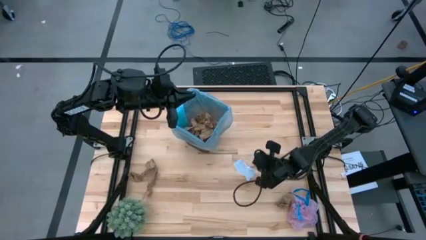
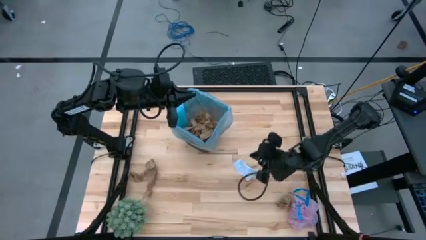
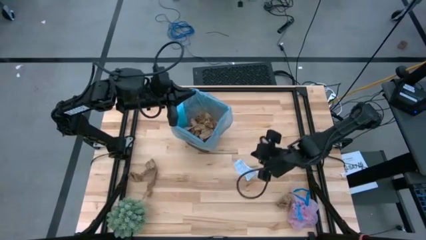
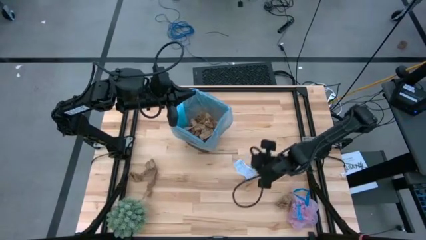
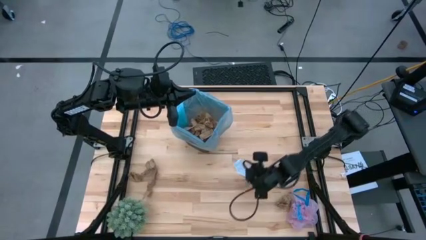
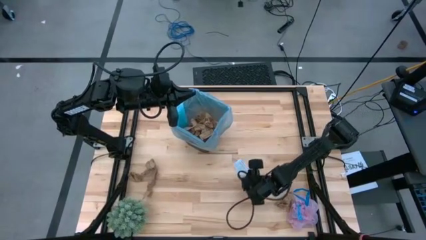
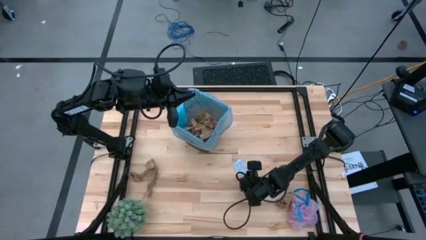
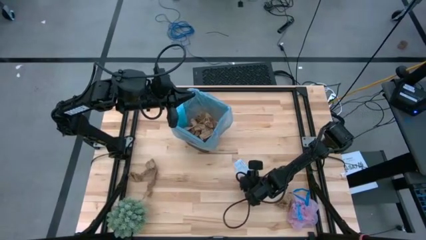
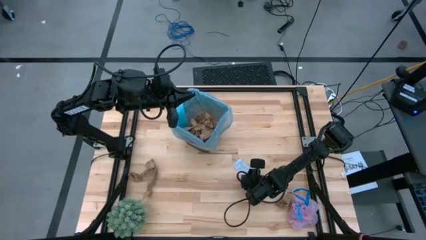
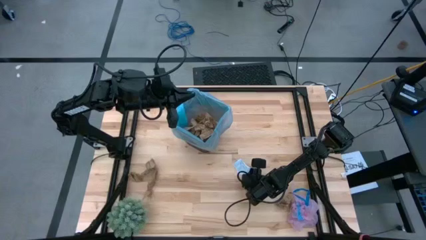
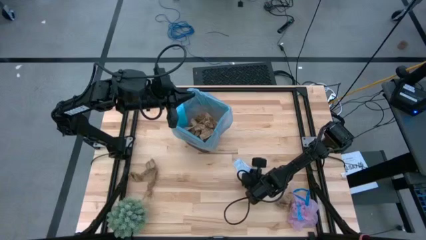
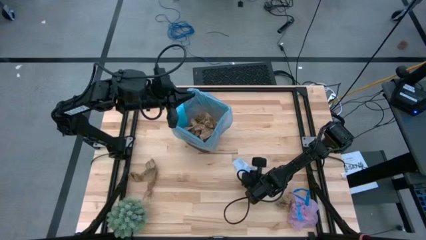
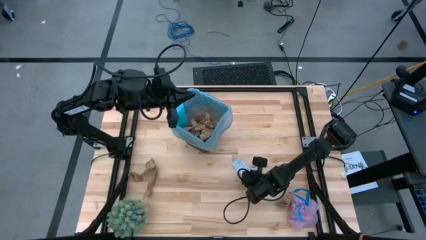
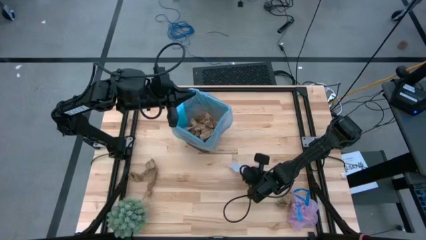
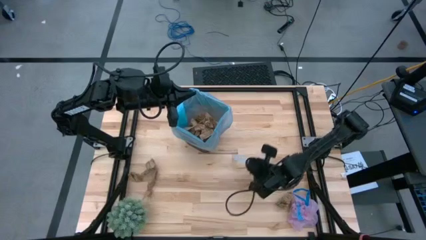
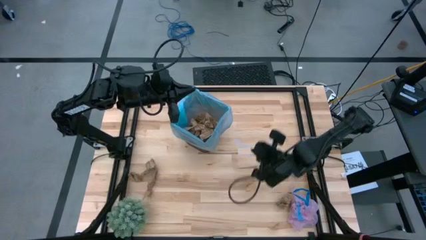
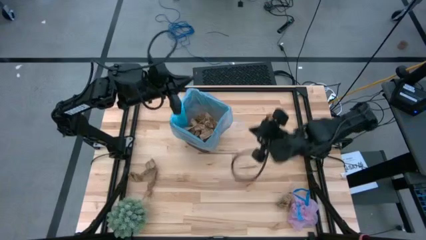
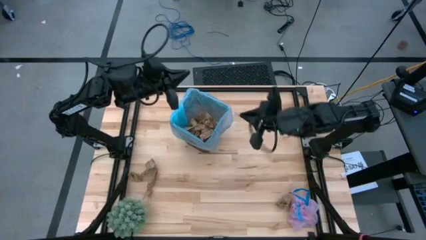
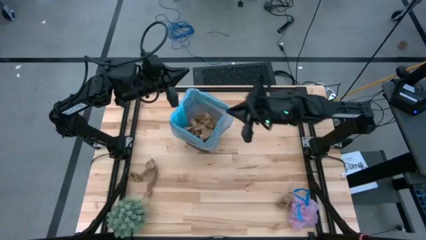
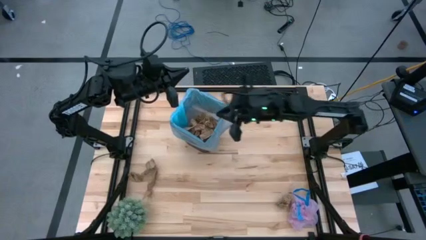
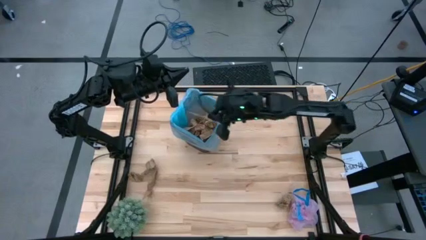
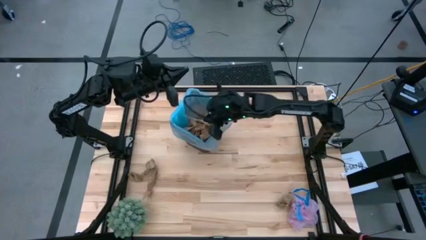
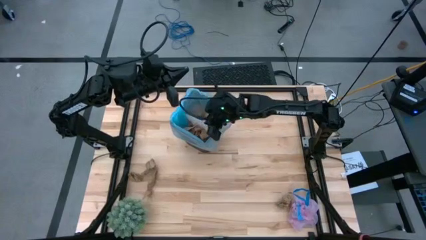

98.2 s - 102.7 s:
Task: Pick and place trash into bin
Put the gray paper into the brown trash bin

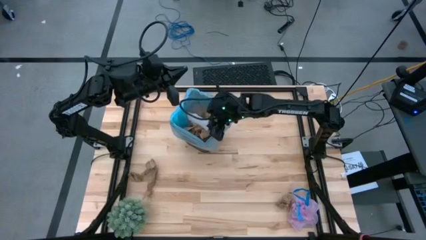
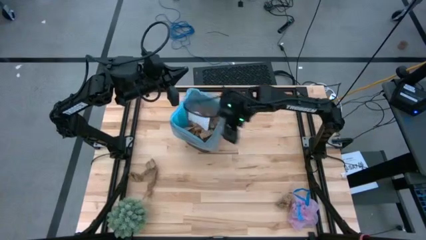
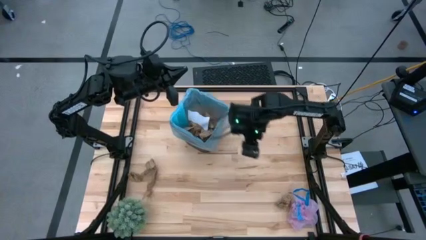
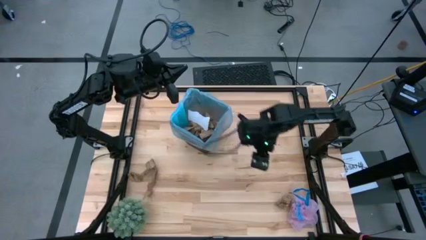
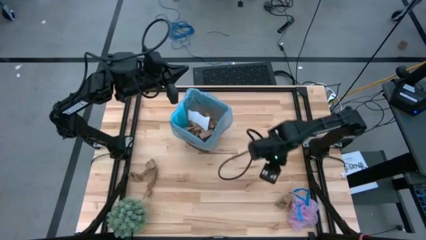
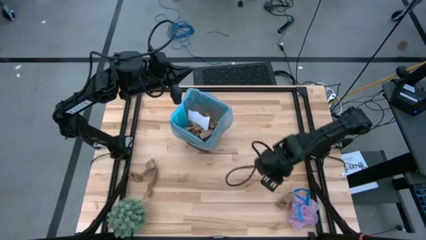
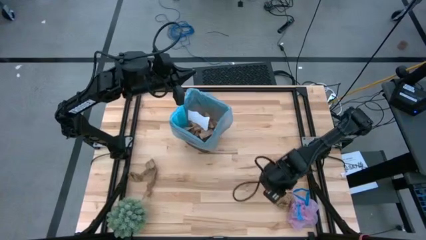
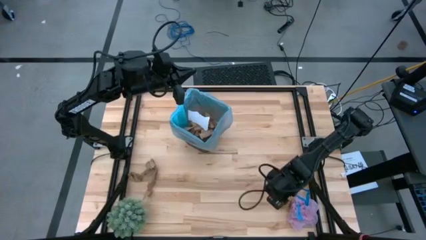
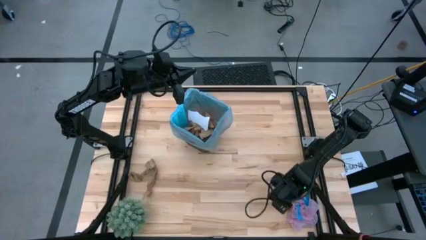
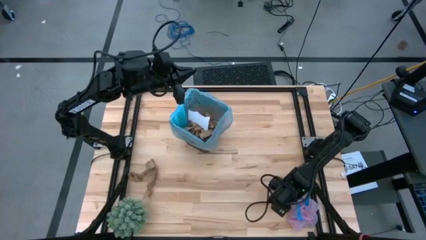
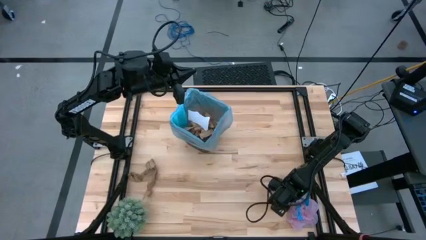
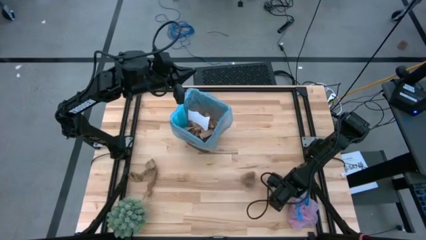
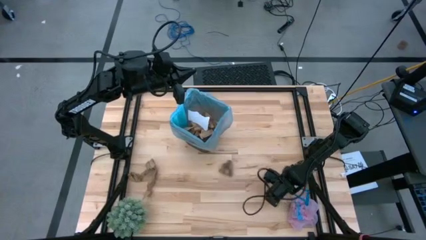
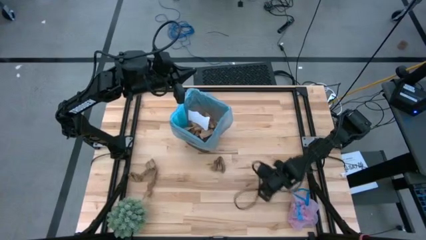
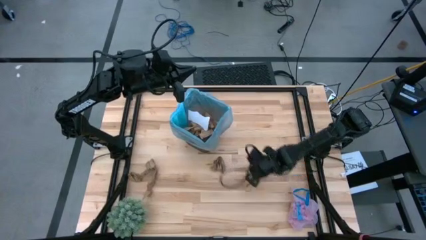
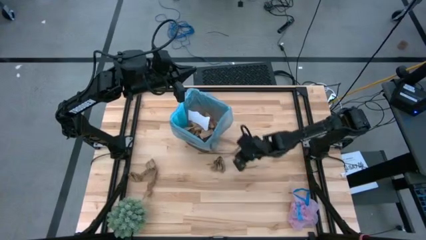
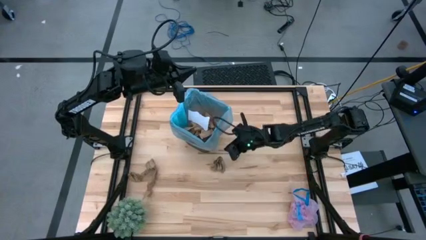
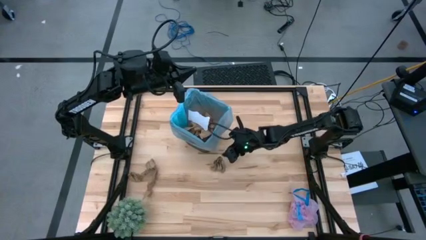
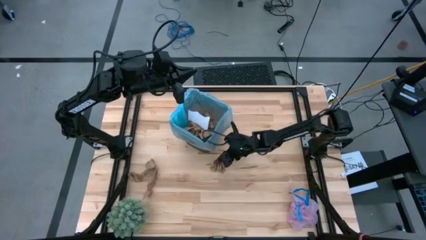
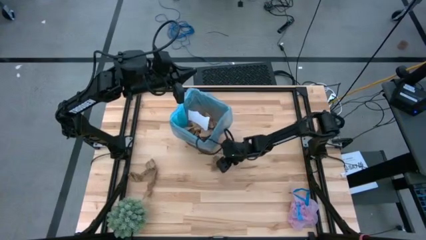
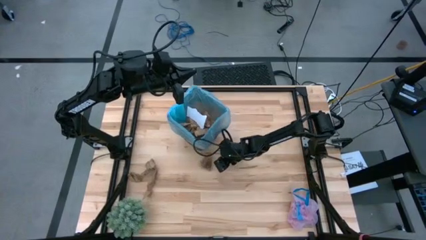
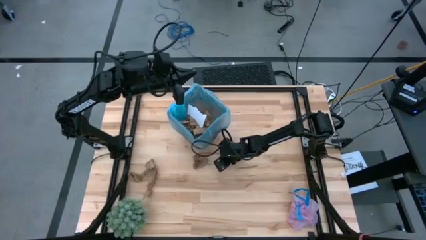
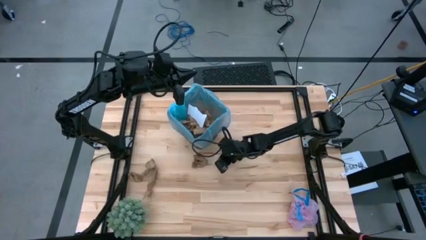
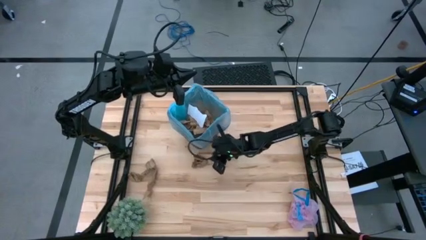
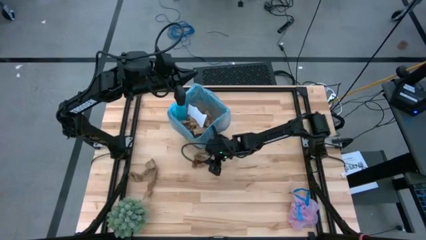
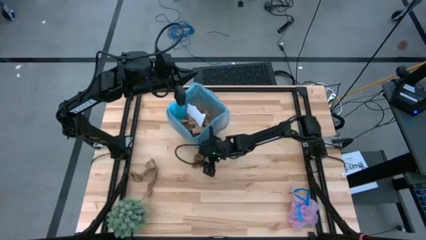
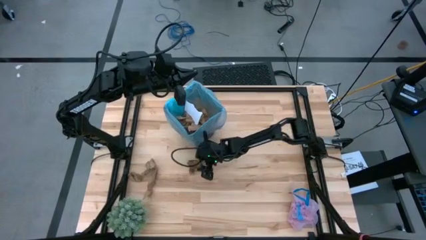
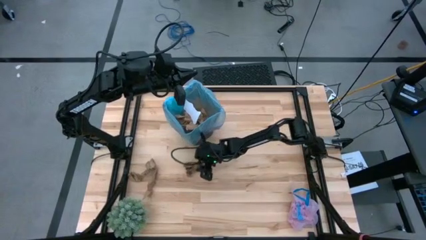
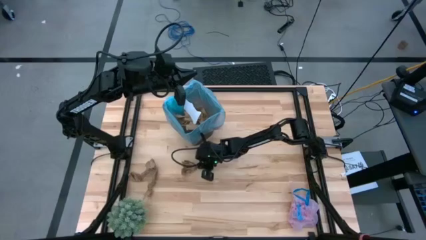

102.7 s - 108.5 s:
Put the brown paper into the brown trash bin

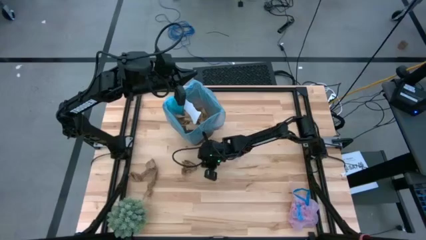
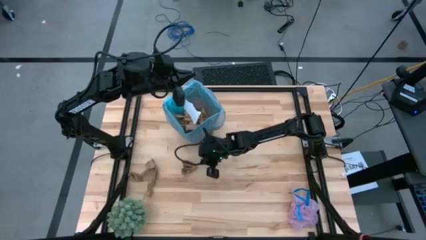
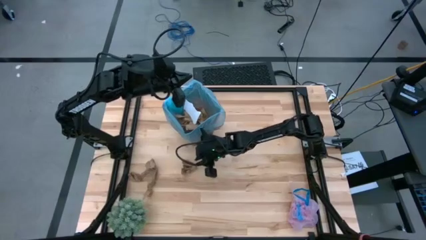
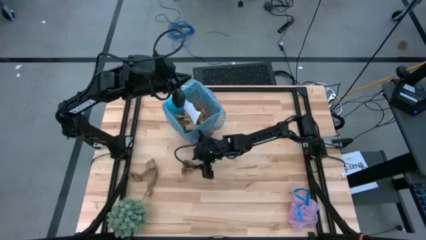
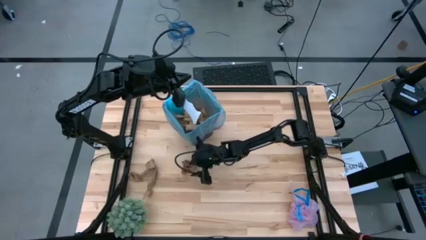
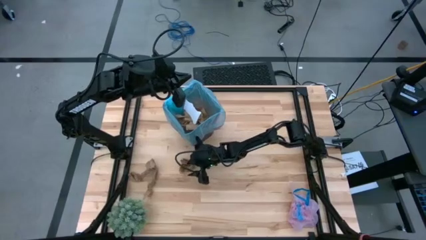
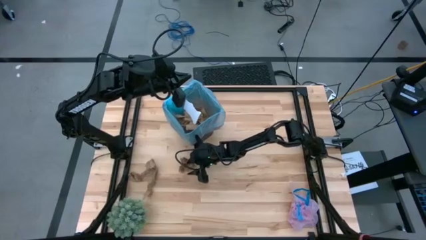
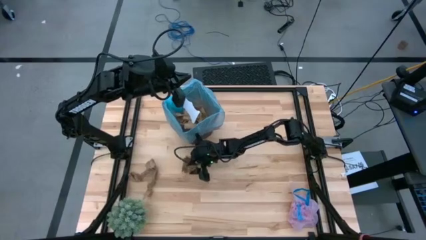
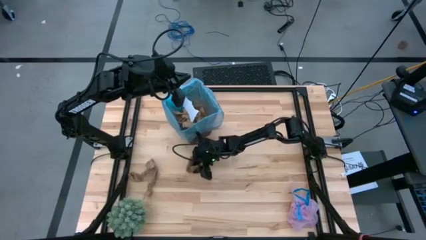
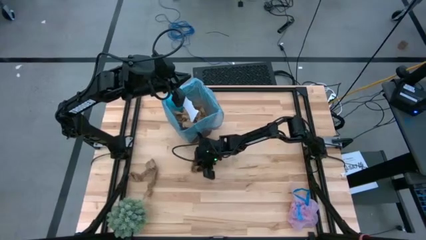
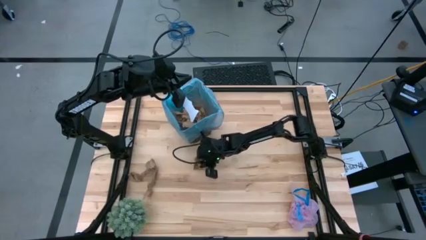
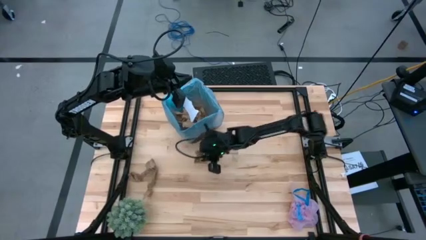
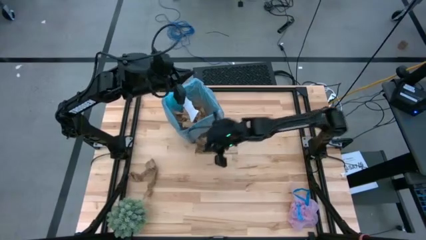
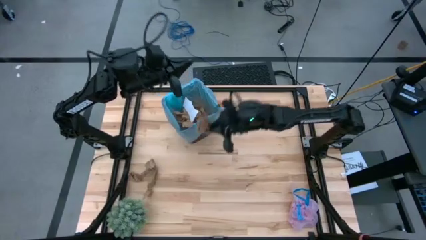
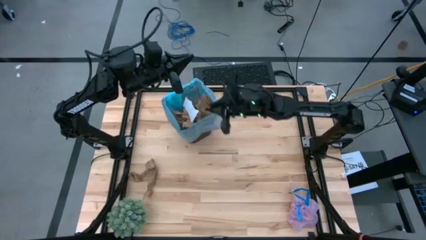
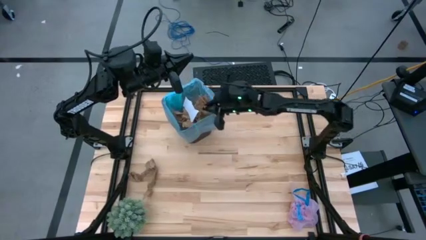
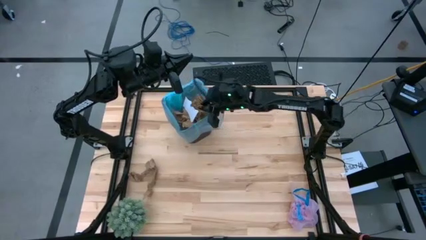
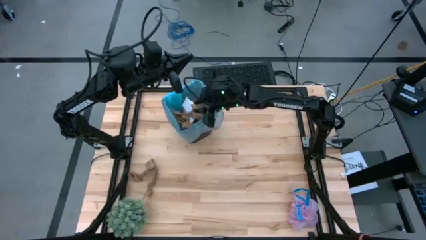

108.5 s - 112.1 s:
Put the brown paper into the brown trash bin
